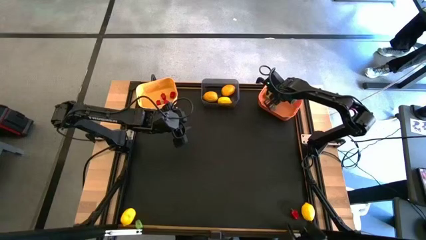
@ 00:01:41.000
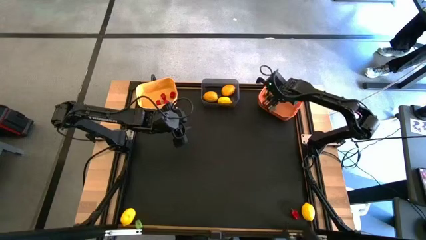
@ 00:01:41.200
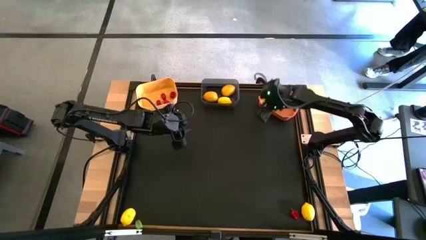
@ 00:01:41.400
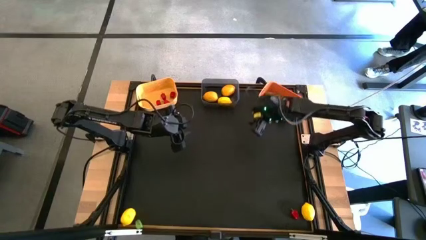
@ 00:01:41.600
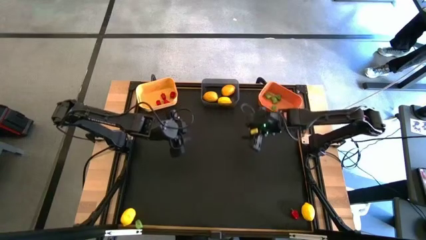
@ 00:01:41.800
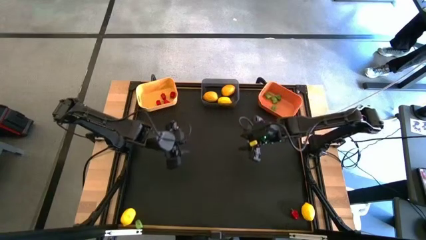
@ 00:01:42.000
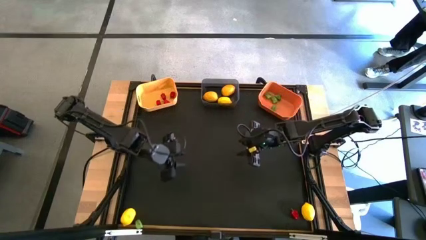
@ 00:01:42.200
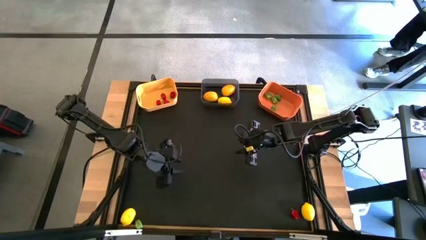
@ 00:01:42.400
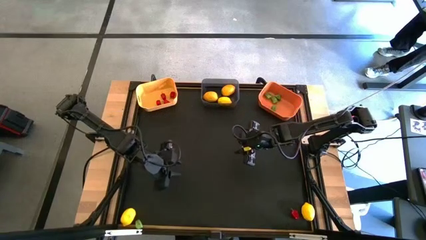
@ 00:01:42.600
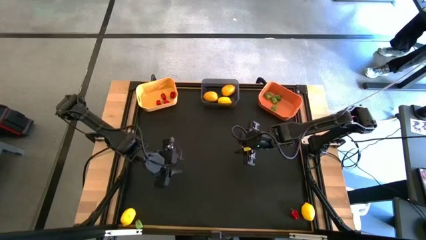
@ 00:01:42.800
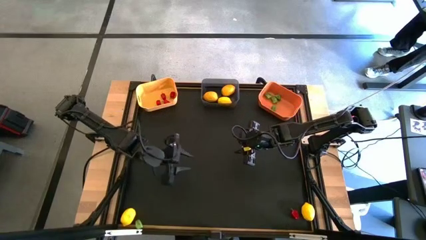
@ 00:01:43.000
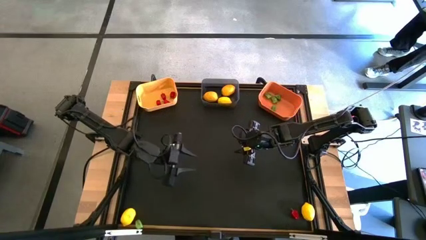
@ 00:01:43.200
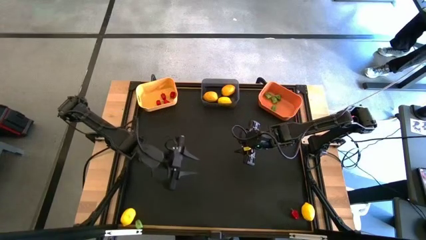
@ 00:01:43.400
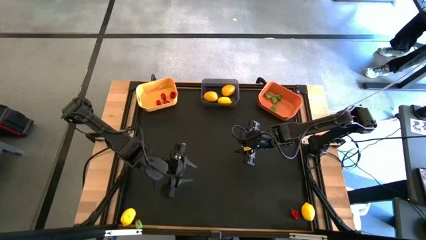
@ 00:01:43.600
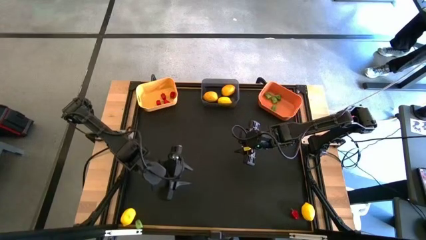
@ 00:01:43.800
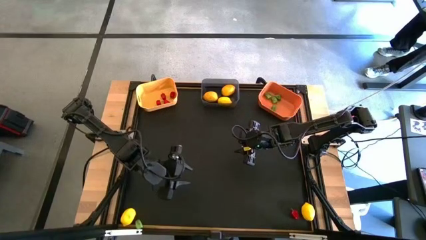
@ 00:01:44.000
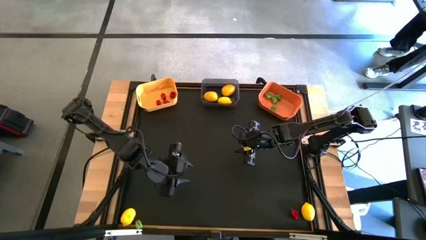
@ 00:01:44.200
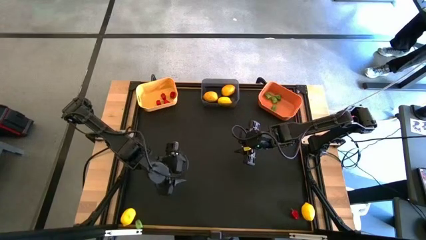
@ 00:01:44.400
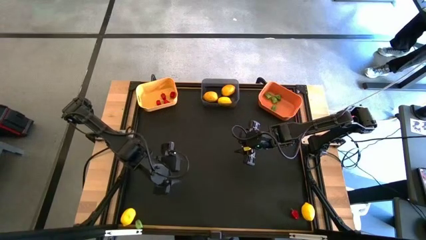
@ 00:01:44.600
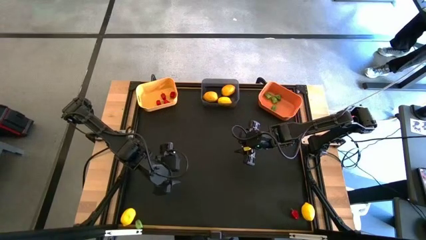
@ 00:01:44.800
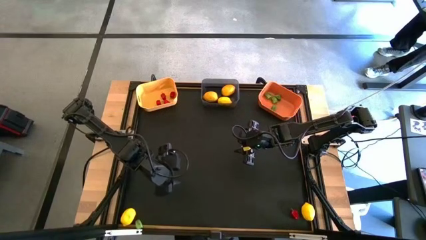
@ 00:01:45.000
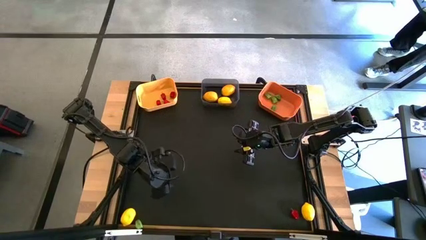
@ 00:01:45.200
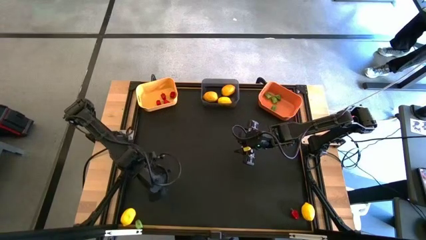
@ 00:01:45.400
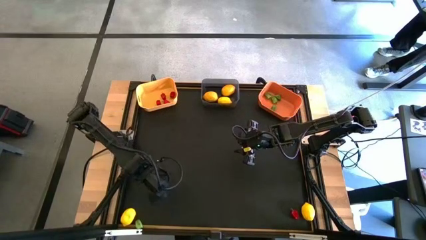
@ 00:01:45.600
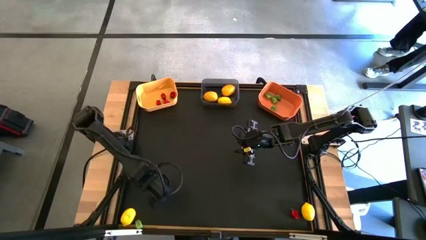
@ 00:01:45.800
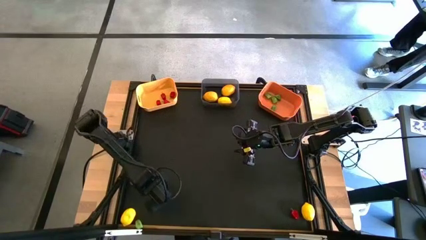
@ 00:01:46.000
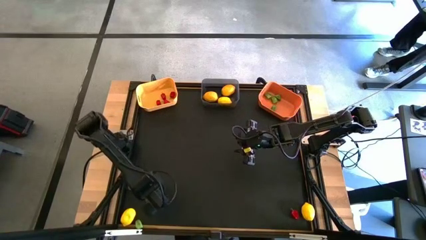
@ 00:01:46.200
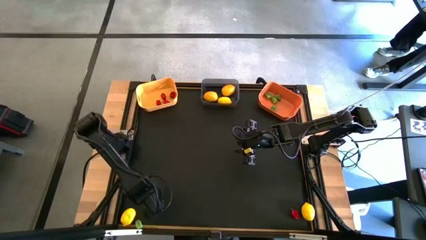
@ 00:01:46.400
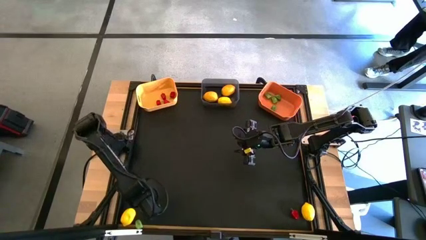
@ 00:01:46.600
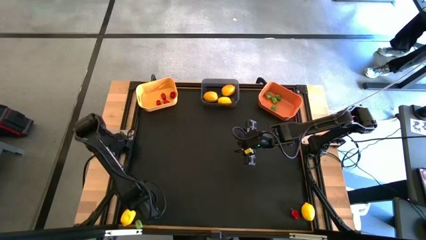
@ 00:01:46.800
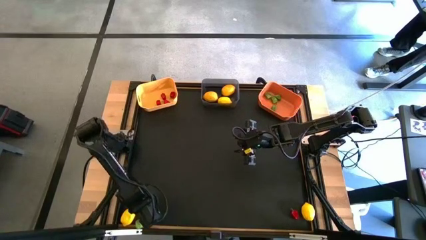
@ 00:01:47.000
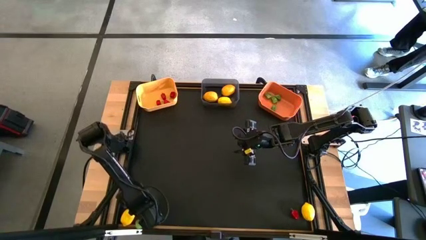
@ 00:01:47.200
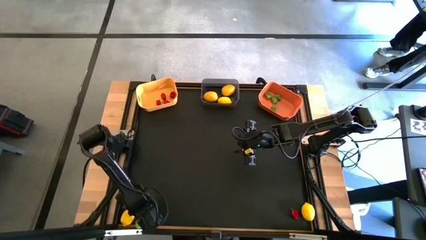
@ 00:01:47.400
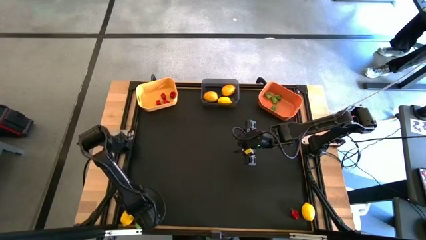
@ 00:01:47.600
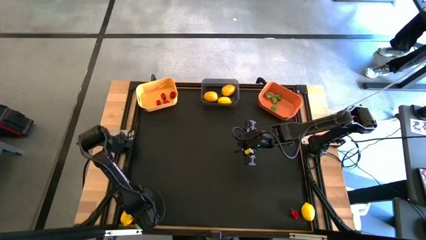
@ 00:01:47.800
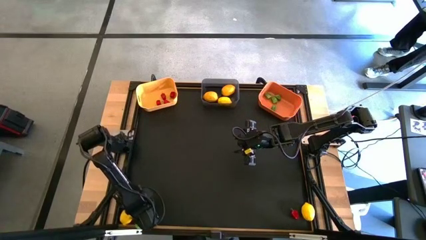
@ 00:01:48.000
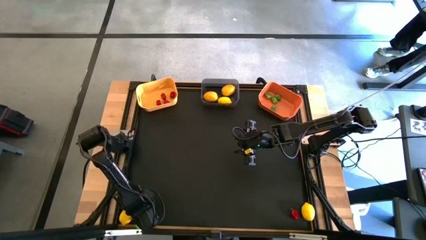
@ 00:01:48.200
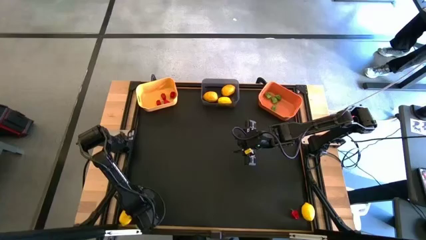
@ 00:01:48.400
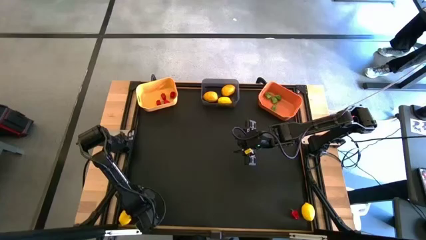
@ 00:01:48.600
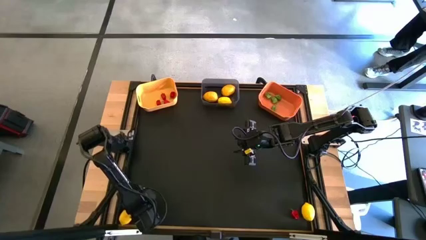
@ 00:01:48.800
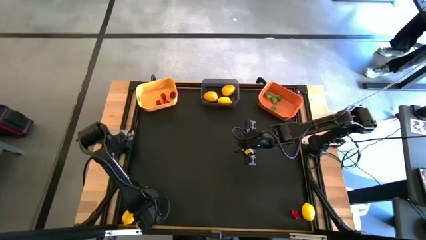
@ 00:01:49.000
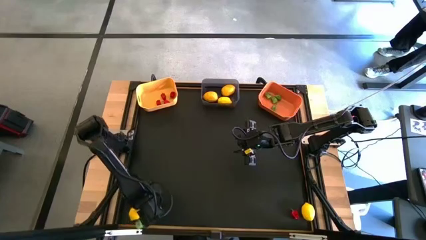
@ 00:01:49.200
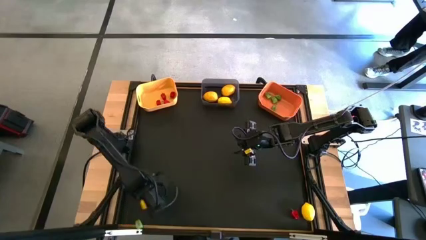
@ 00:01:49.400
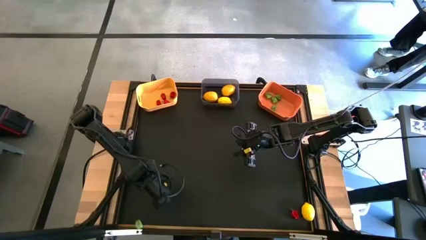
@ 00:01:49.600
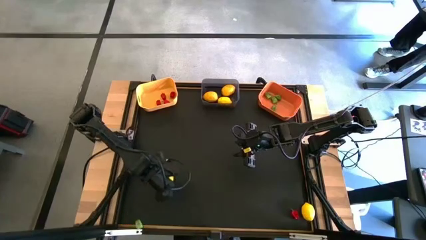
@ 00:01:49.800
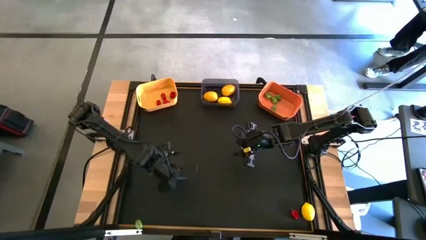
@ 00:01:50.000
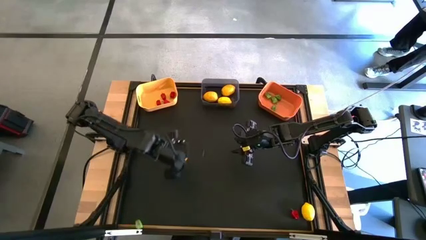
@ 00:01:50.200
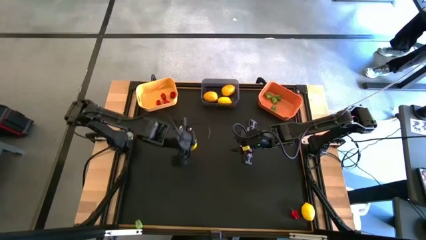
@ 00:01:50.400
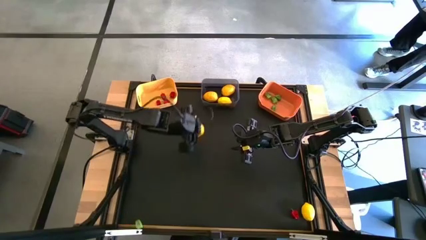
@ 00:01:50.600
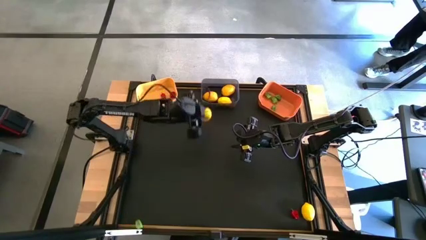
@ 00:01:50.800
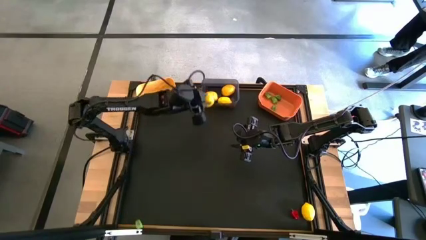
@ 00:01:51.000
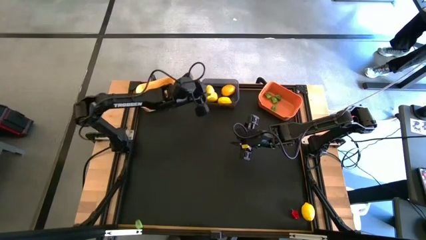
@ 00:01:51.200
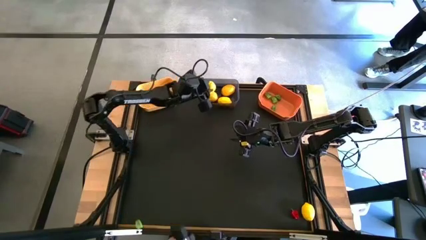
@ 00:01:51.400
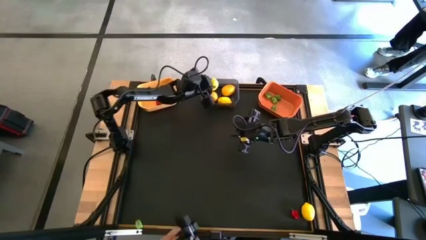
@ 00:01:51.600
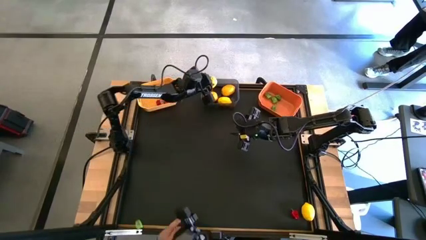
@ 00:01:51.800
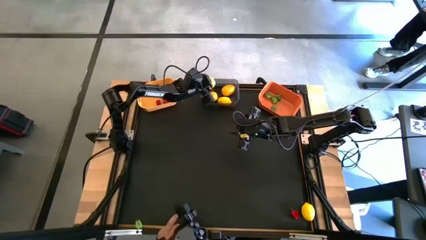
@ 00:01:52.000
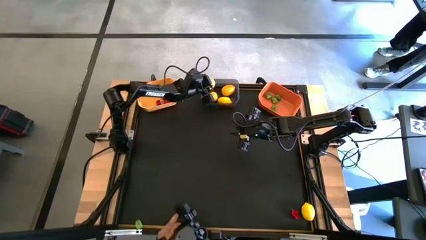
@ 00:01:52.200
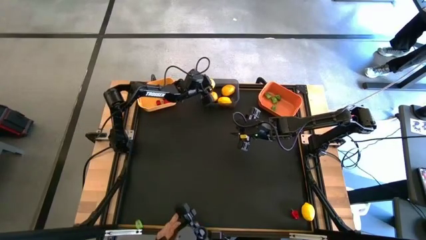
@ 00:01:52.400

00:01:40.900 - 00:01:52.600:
Task: Sort produce into baskets
Put the yellow lemon into the black bin

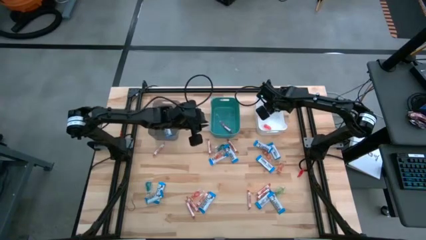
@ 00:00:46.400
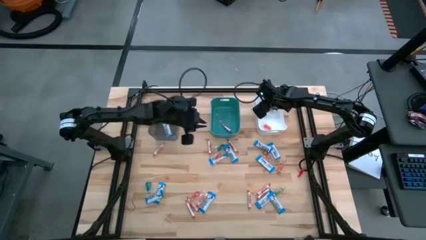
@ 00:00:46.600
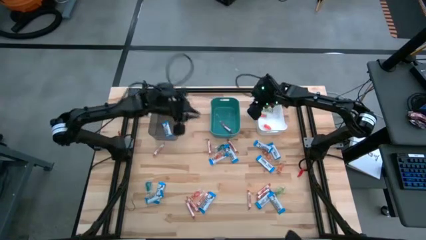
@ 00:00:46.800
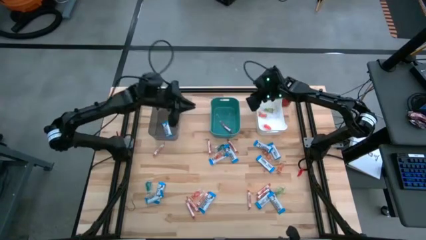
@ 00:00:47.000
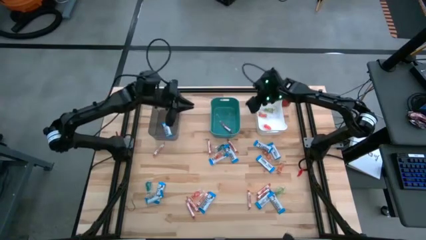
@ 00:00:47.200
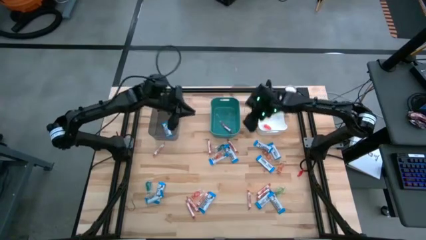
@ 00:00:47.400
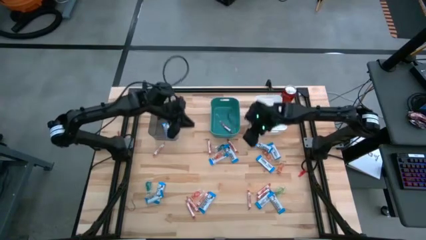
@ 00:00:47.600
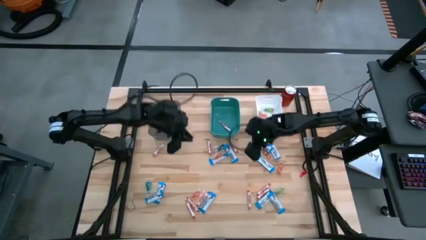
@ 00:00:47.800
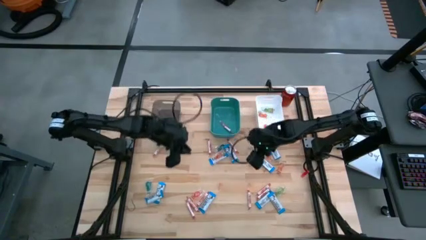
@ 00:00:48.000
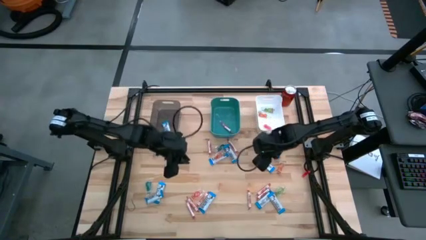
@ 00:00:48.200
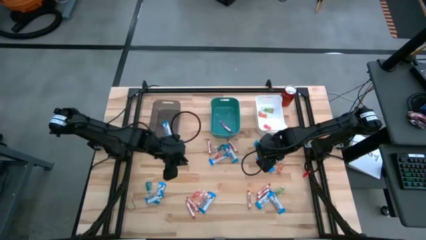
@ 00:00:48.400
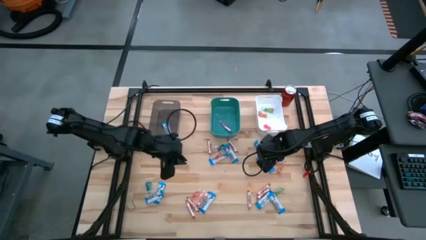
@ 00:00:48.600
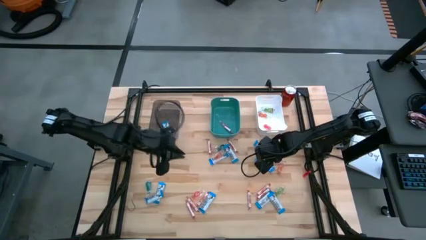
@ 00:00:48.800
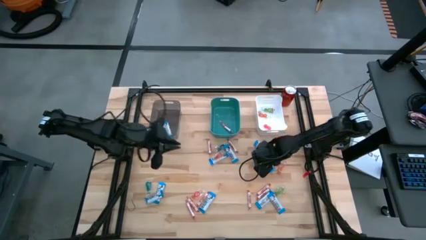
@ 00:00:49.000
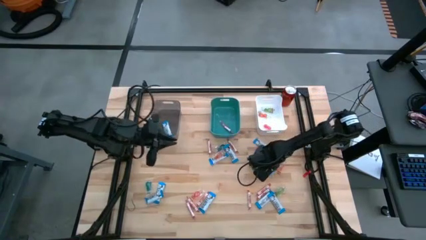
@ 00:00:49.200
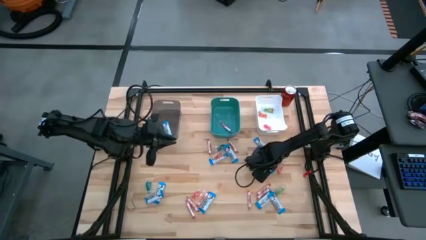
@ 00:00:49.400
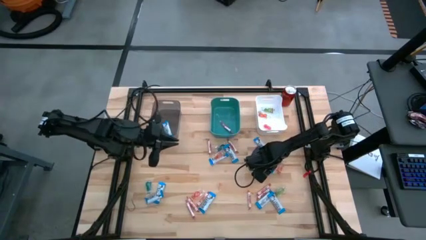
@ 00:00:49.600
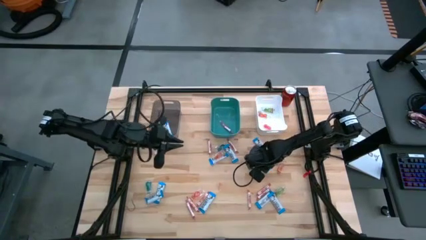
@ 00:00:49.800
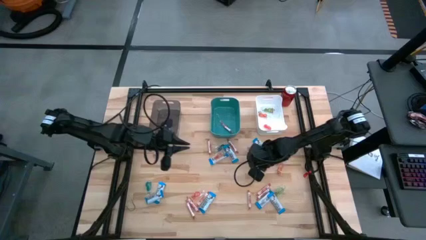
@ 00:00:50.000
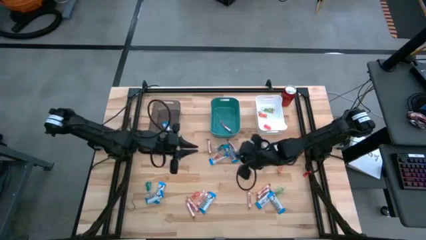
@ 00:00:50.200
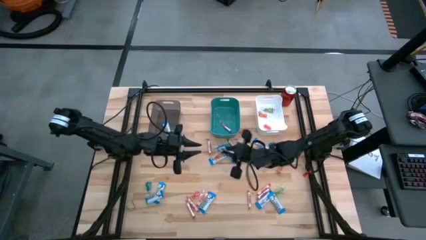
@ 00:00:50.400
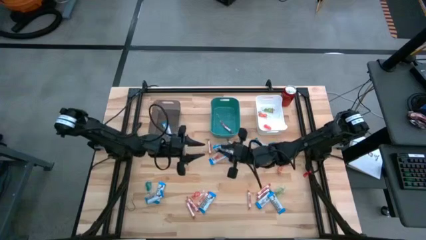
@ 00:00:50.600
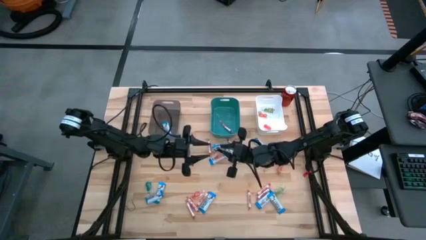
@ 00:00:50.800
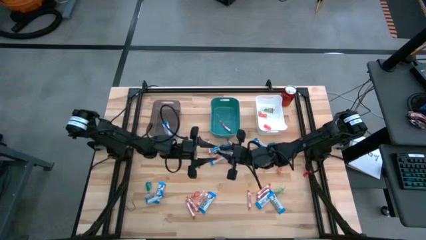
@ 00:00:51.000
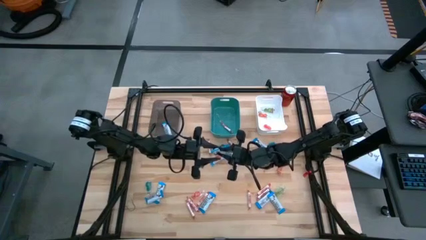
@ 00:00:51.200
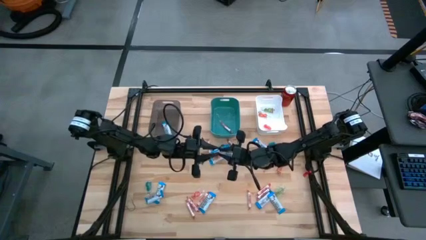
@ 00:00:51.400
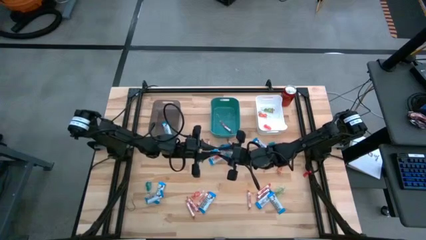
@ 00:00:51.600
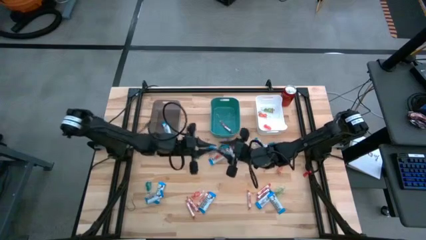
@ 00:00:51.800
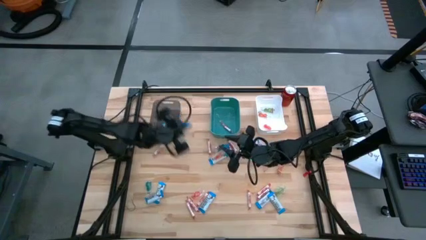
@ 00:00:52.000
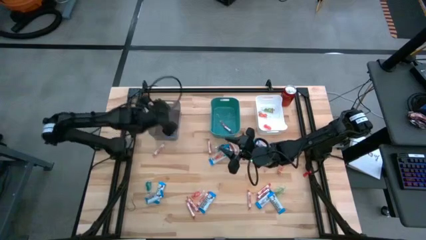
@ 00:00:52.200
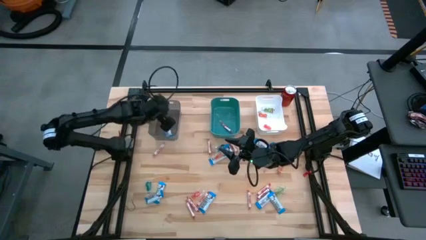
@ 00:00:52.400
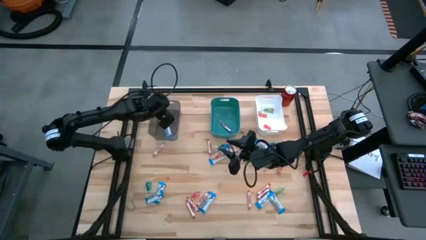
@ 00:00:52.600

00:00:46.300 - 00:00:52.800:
Task: Sort candy
Put the white chocolate into the black bin
